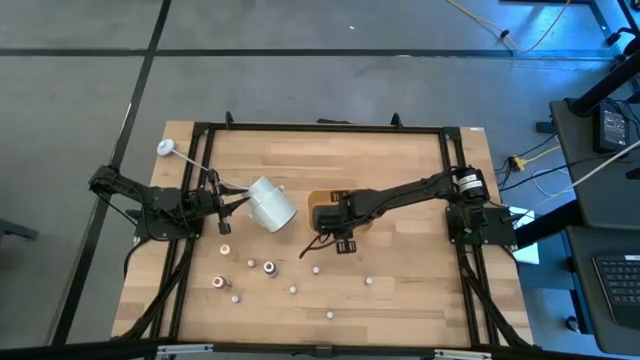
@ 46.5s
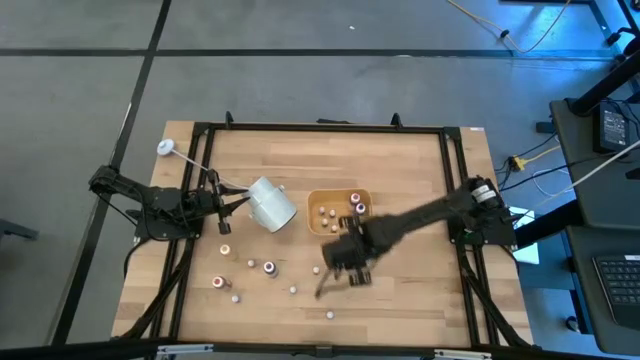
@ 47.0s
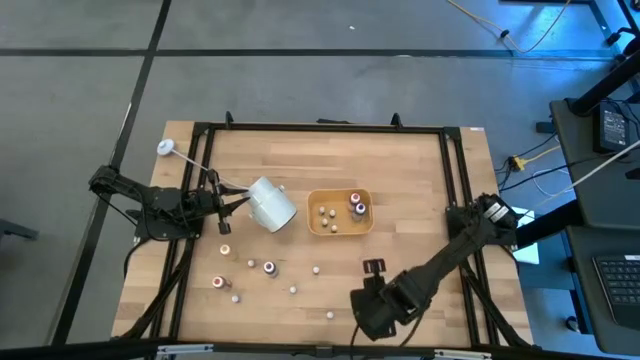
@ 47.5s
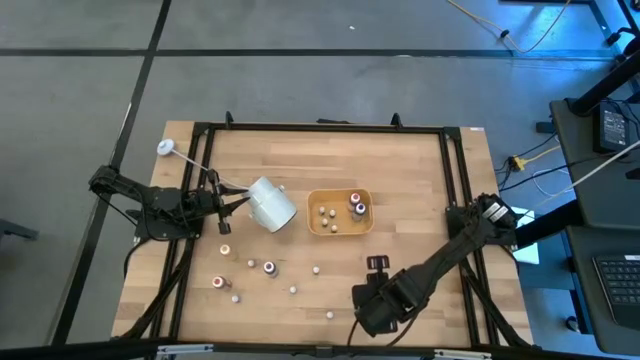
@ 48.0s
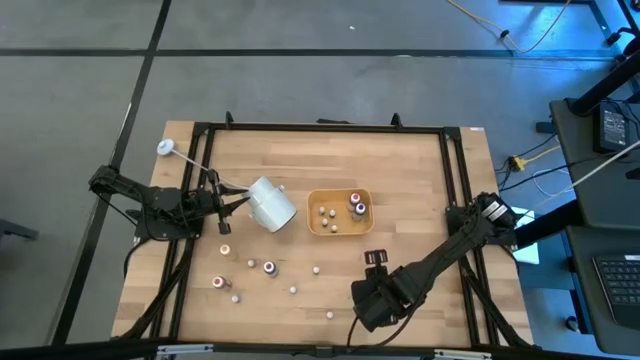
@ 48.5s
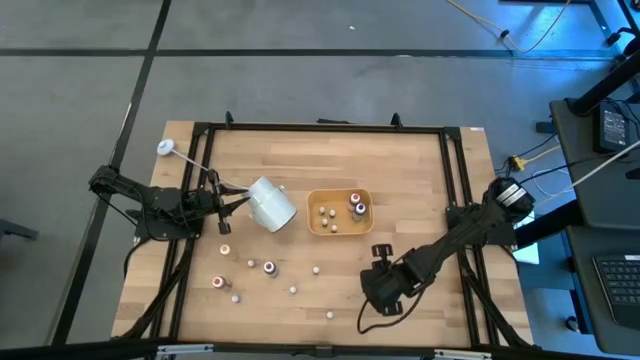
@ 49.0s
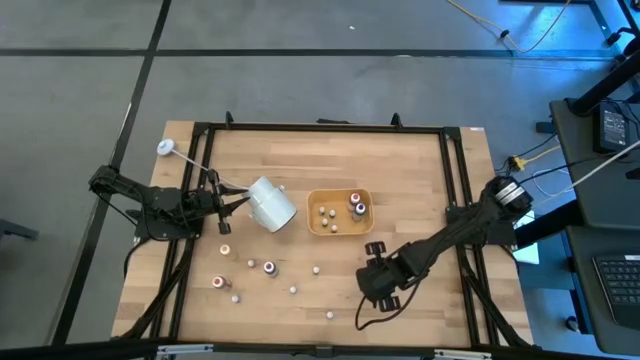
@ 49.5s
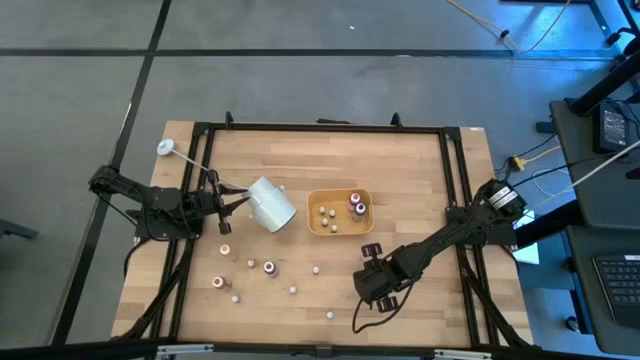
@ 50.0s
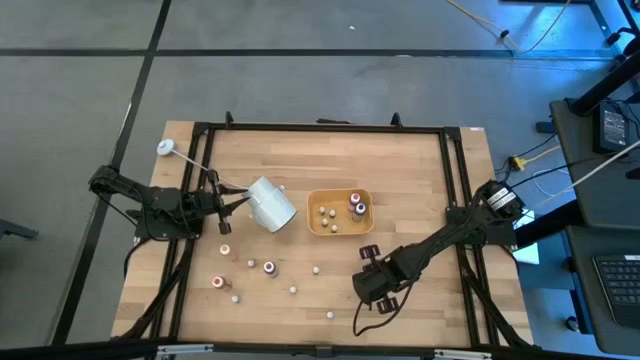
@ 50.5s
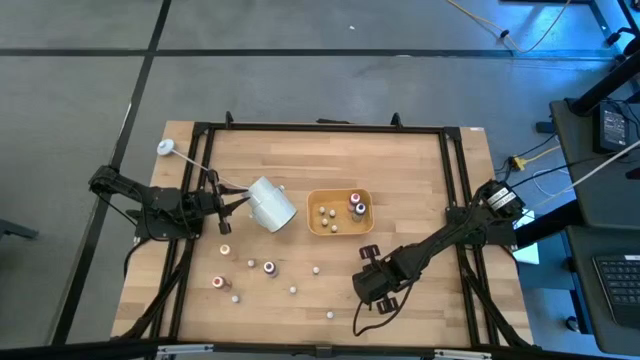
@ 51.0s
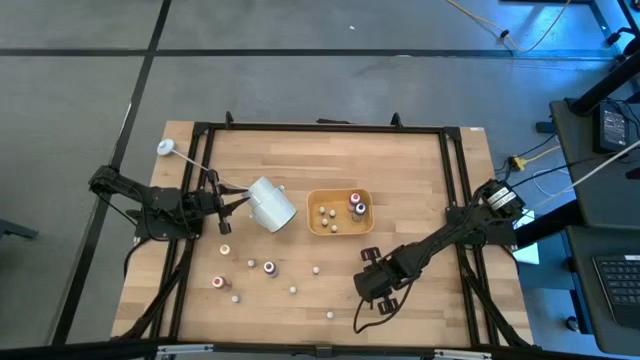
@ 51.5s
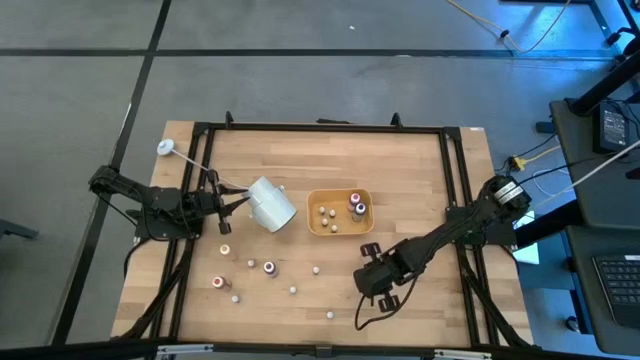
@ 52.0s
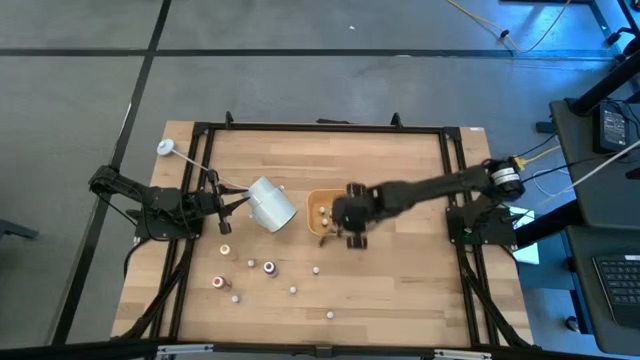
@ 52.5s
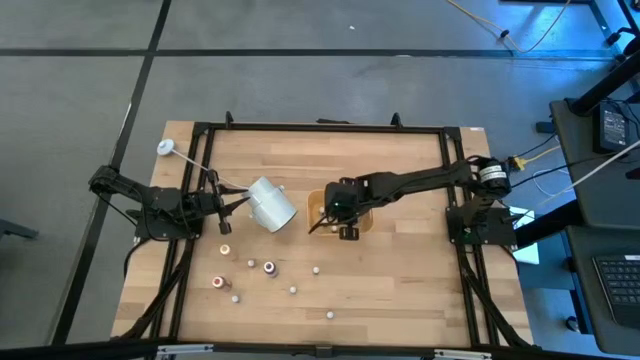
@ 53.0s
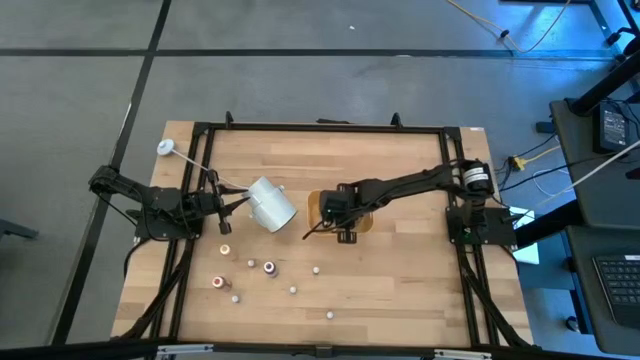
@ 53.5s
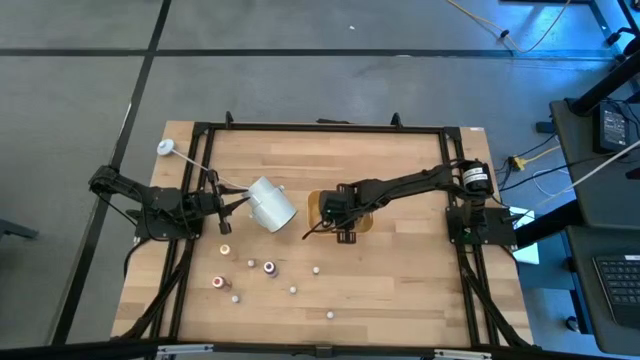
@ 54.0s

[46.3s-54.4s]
Task: Pick & Place food coloring
Put the right small blue food coloring bottle into the yellow bin

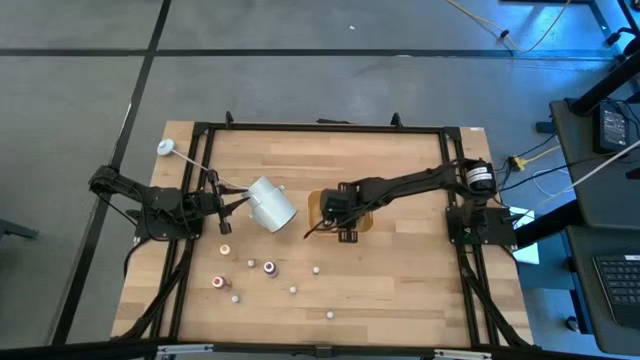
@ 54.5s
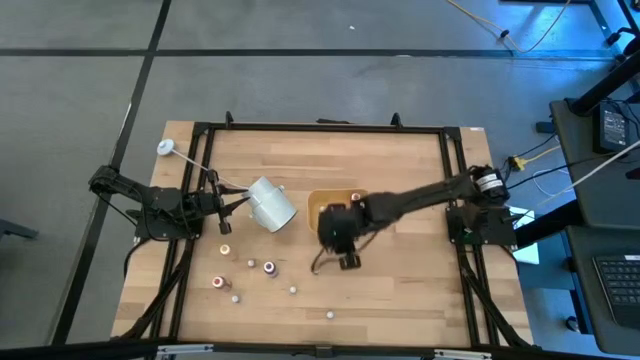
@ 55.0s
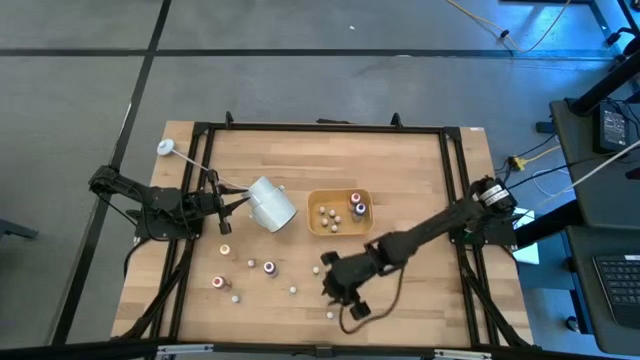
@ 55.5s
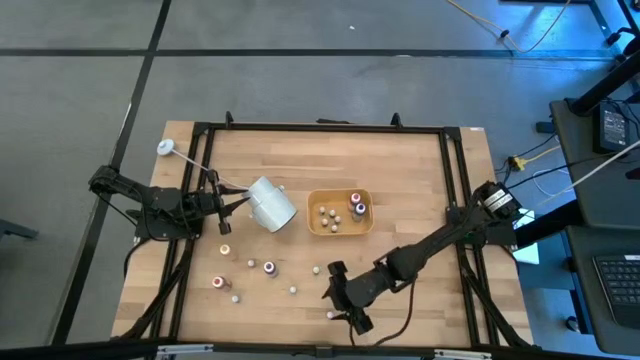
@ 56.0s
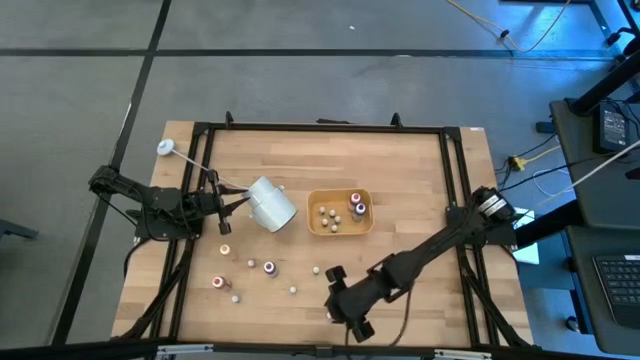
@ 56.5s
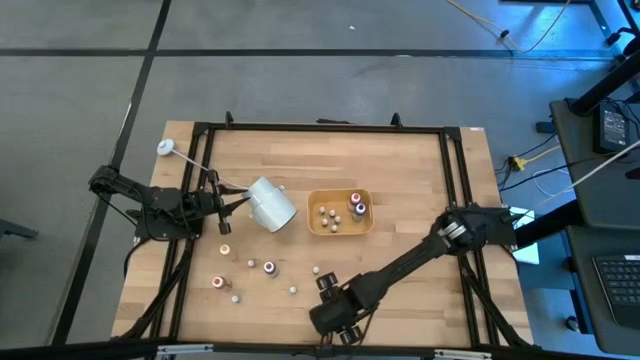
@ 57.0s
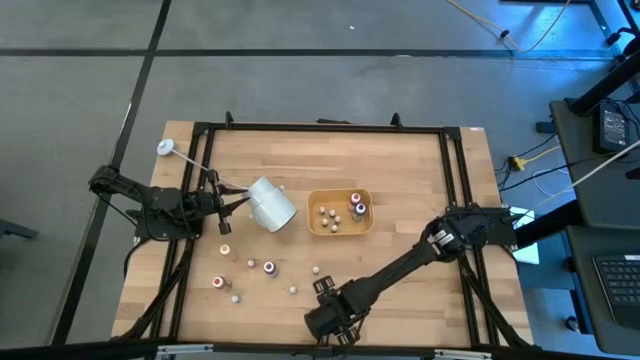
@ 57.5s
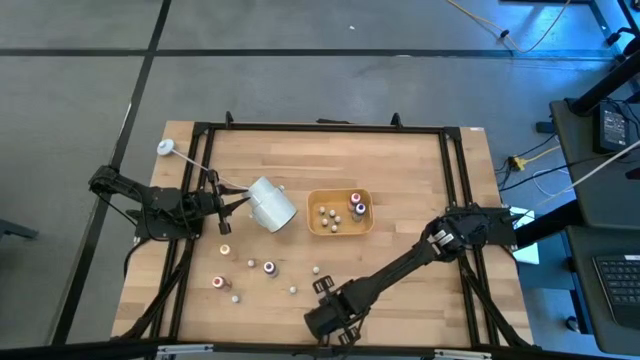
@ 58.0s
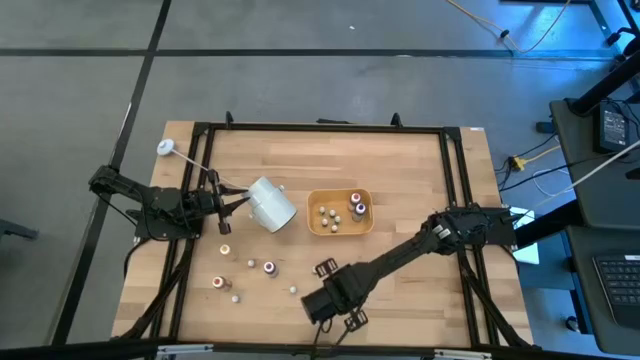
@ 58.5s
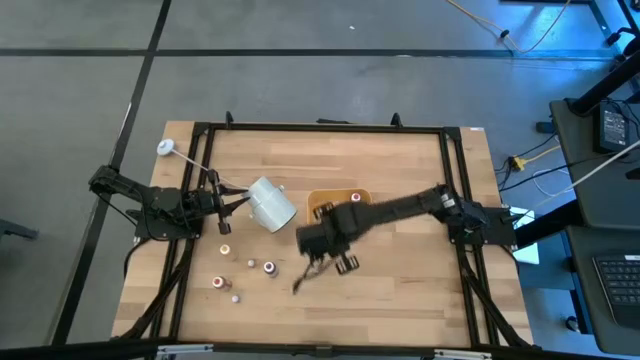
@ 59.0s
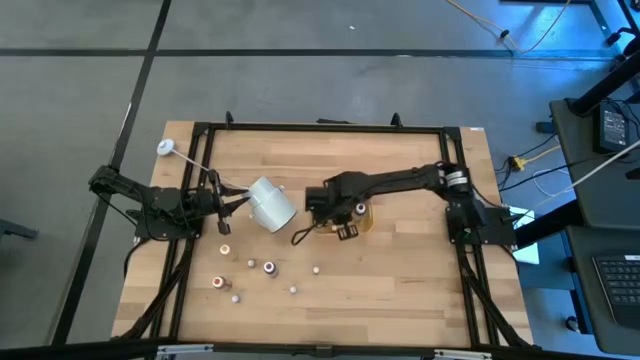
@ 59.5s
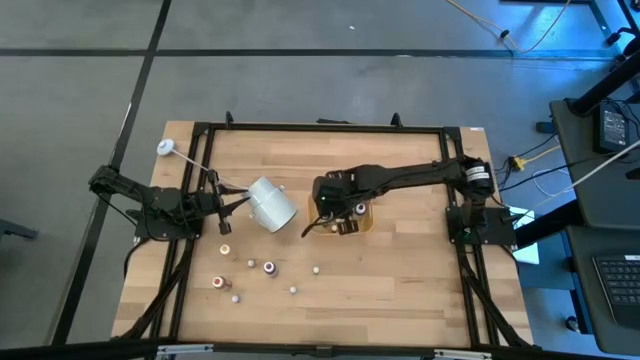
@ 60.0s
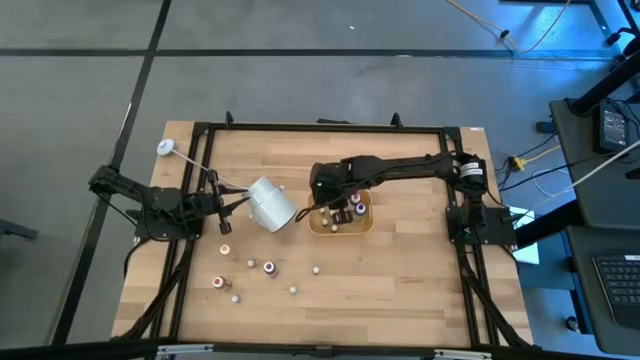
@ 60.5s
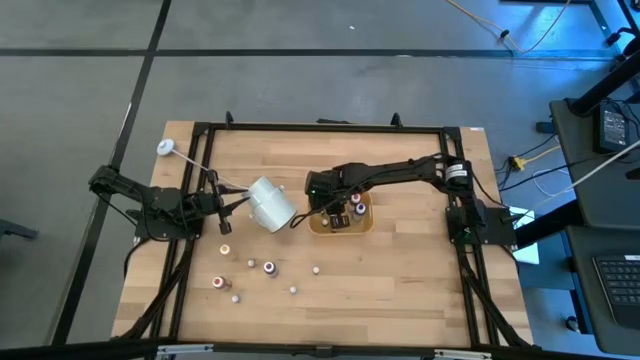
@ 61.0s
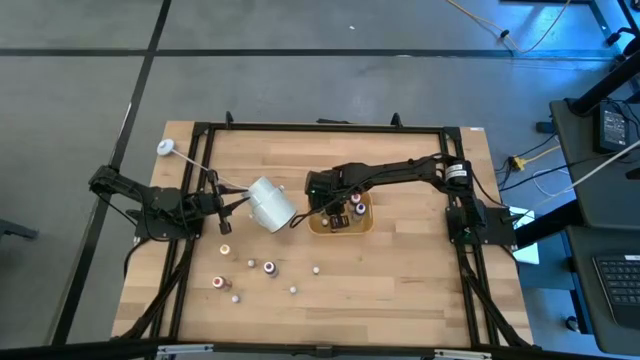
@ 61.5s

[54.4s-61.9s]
Put the small red food coloring bottle into the yellow bin

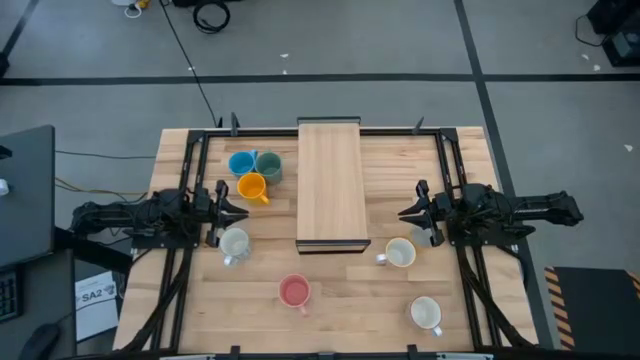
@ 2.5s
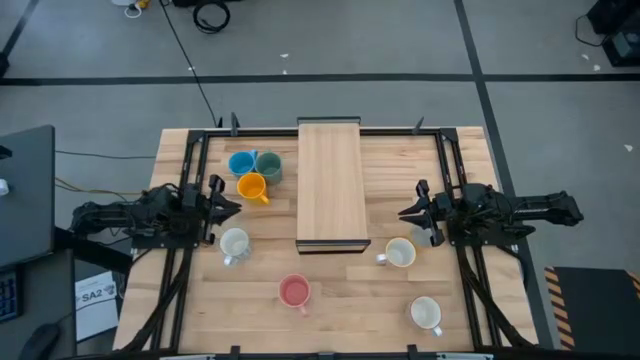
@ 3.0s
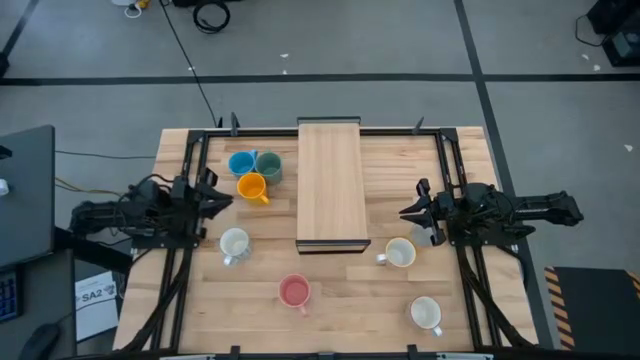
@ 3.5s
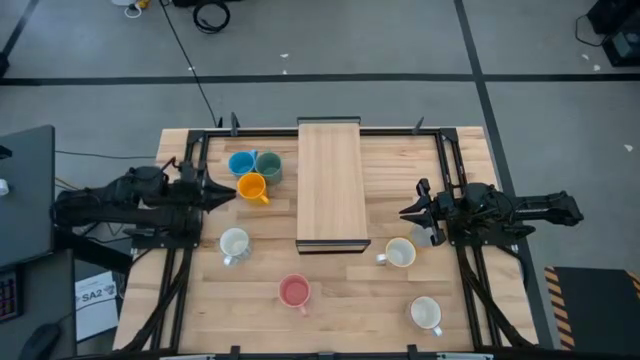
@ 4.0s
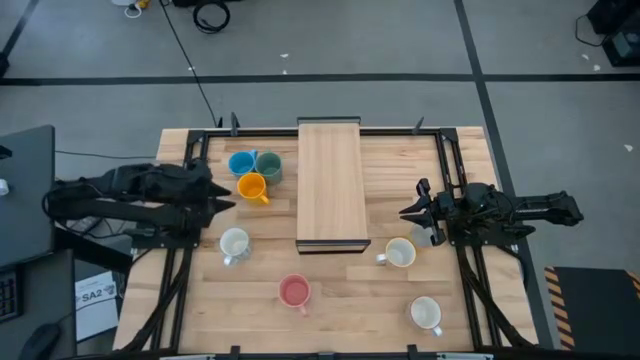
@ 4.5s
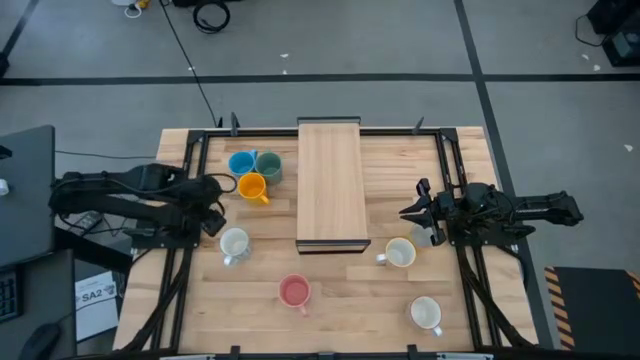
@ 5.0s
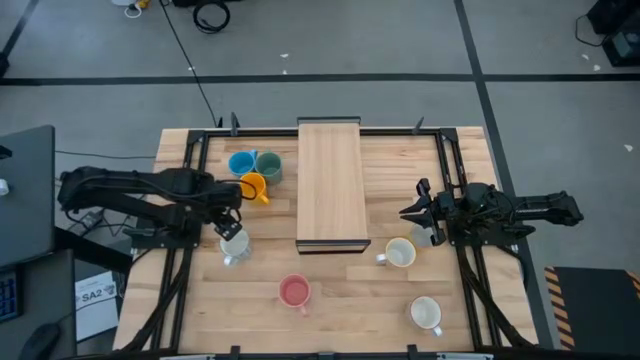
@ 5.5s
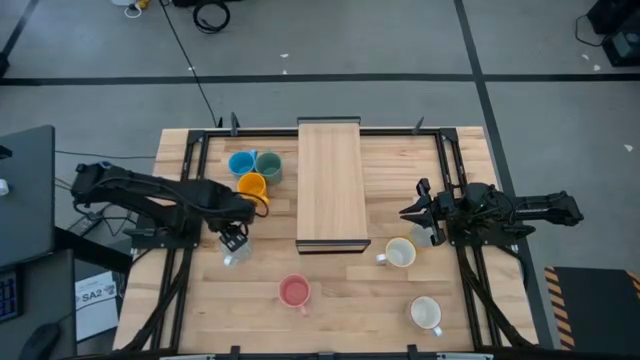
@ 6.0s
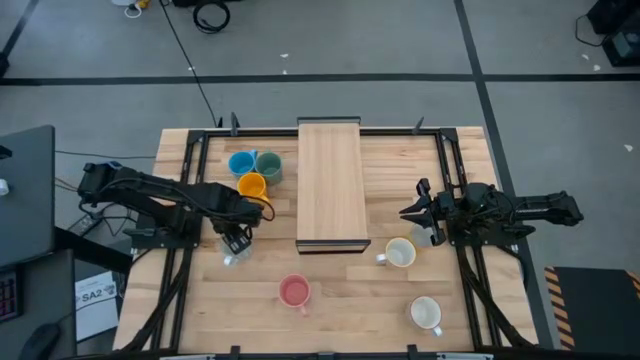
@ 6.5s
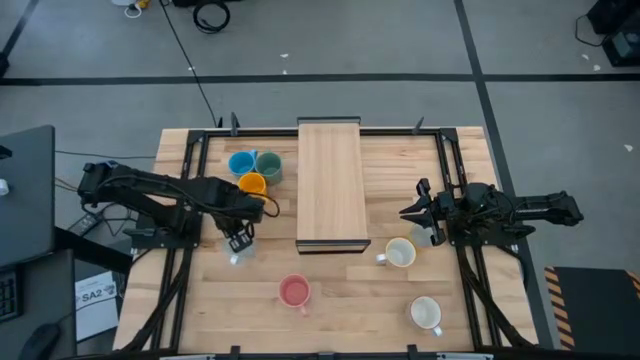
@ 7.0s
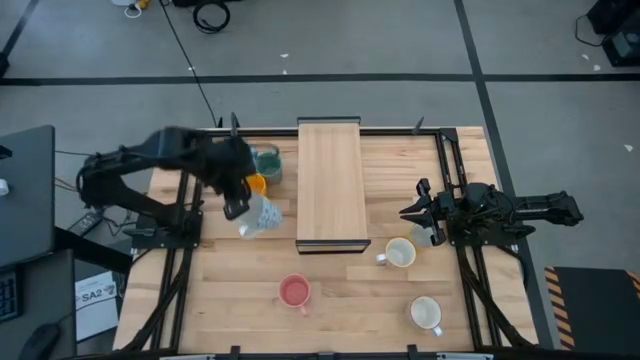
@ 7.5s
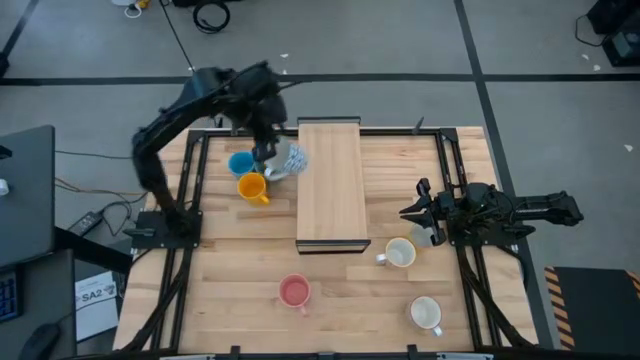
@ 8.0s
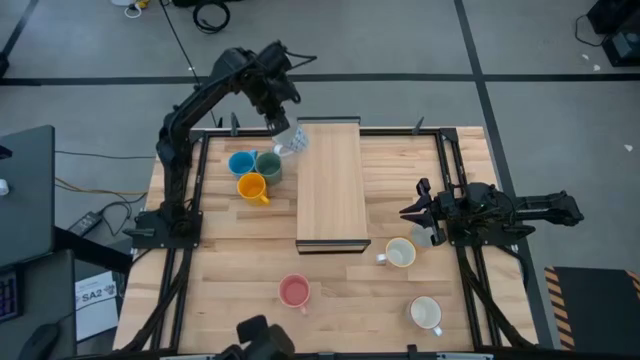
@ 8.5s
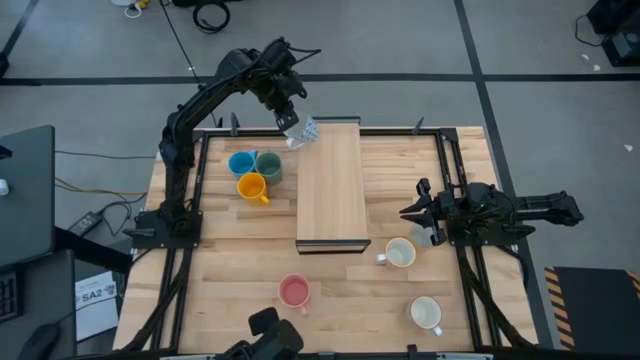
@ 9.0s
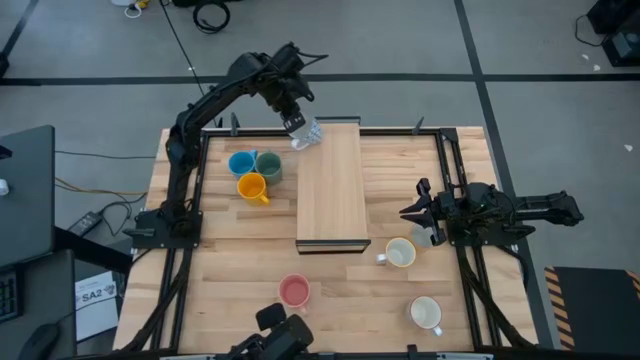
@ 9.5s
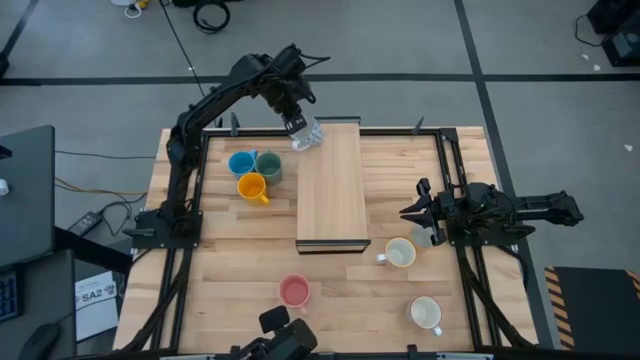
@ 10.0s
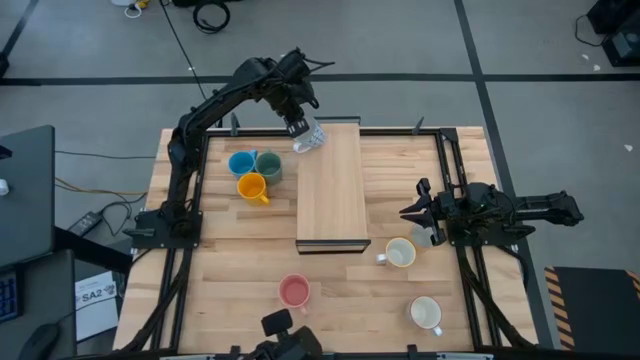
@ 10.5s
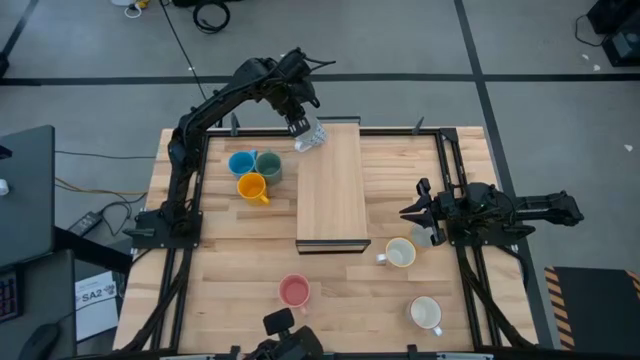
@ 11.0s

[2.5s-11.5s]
Task: Place coffee mugs
Put the white patterned mug on the shelf
